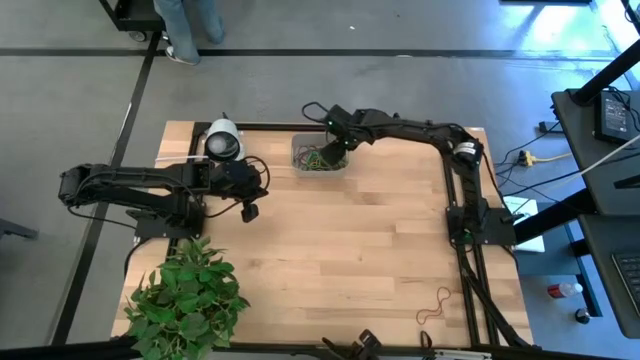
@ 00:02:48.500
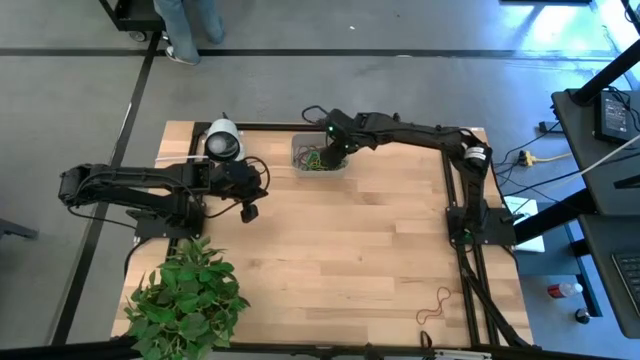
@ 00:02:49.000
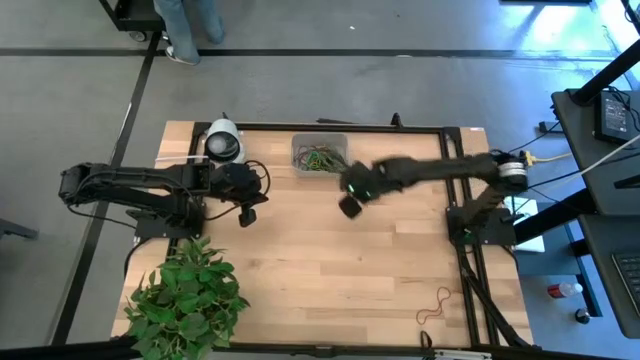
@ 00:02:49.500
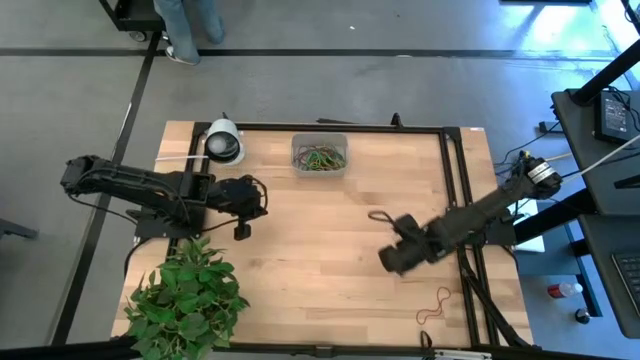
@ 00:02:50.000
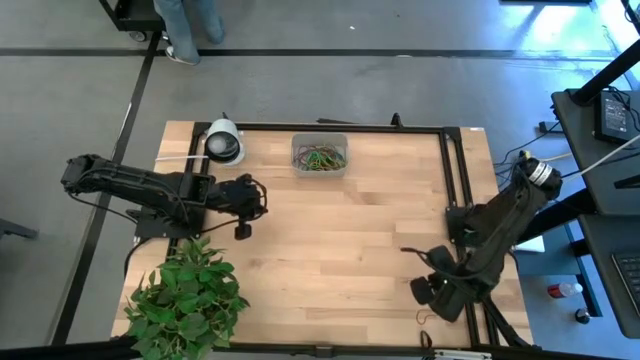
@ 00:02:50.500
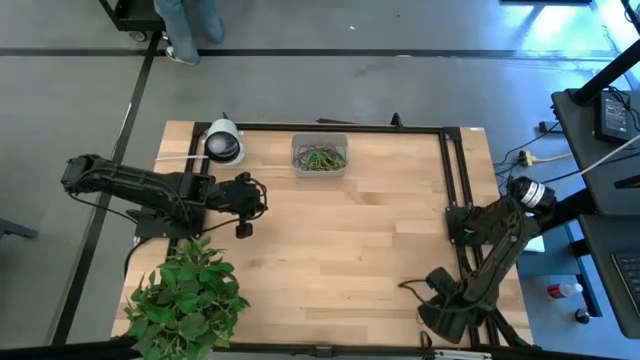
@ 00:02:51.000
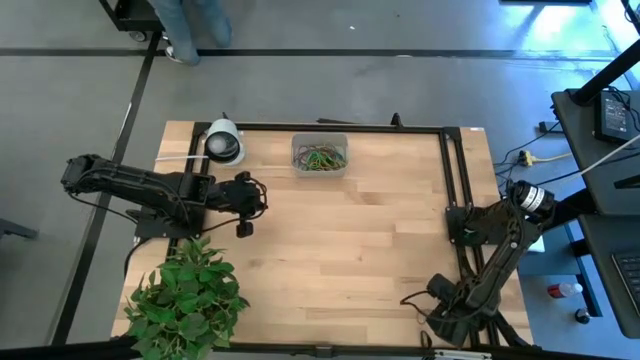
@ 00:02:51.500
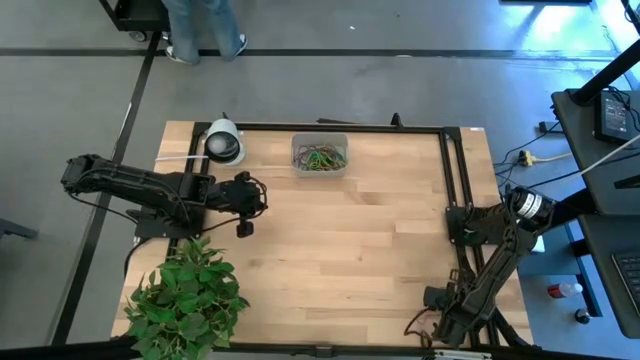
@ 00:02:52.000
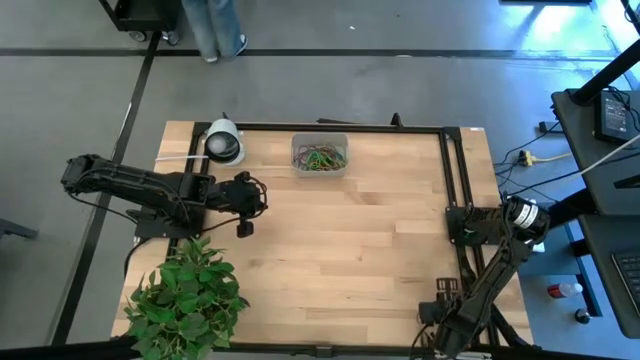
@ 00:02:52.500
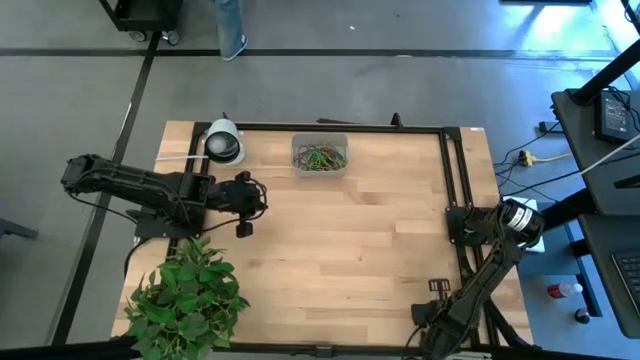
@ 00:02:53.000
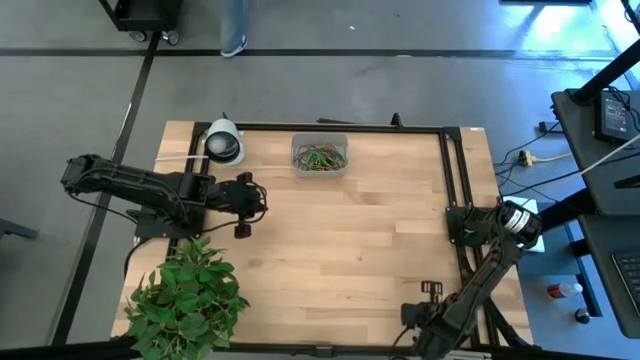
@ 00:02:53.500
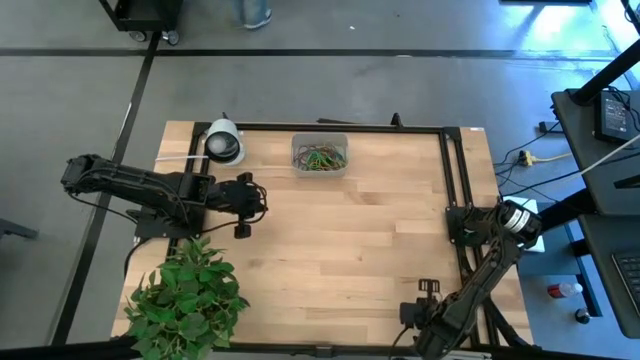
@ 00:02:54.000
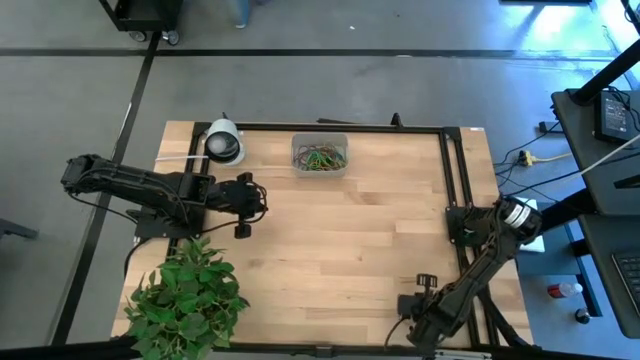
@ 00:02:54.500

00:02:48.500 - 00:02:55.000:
Task: Pick and place rubber bands into bin
Put the red rubber band into the white bin

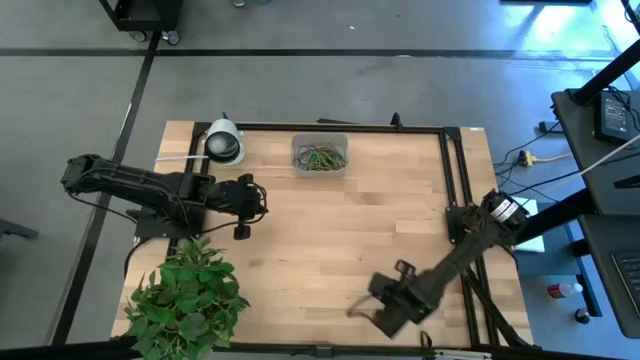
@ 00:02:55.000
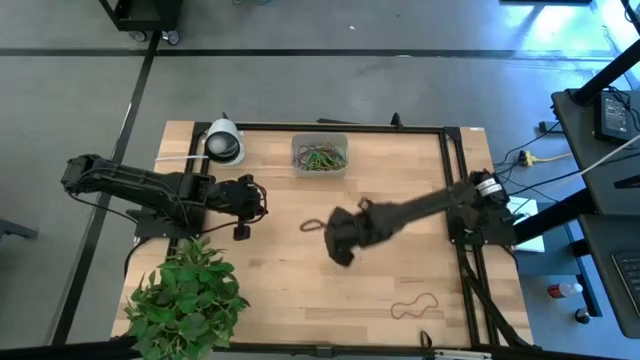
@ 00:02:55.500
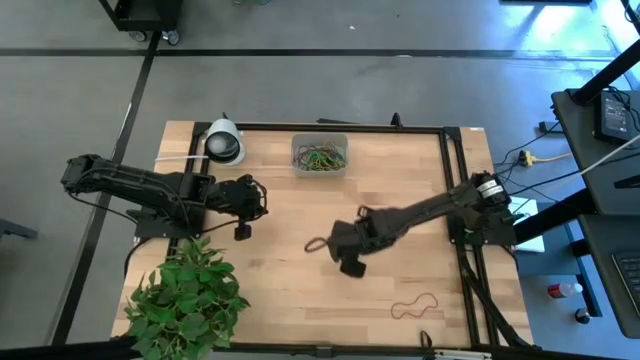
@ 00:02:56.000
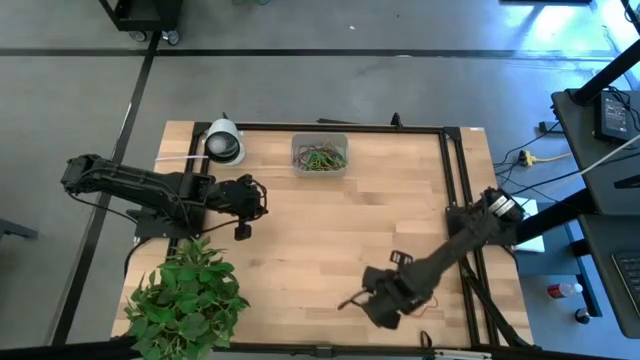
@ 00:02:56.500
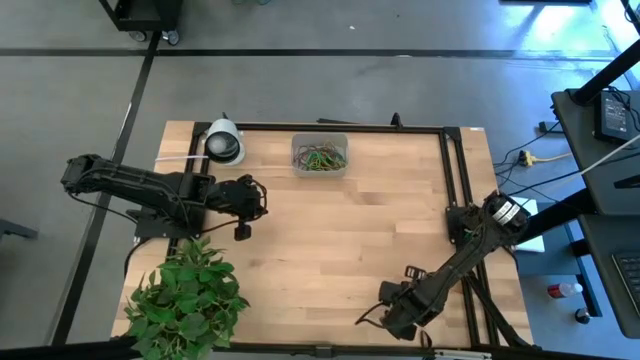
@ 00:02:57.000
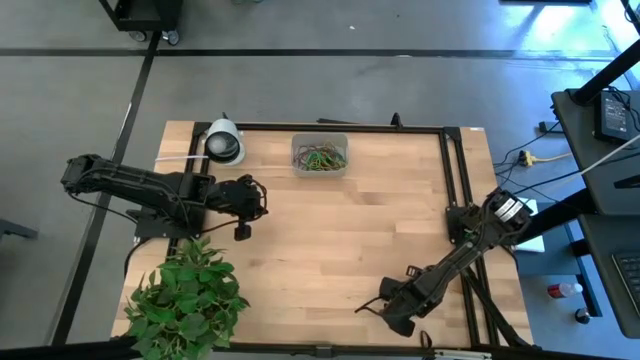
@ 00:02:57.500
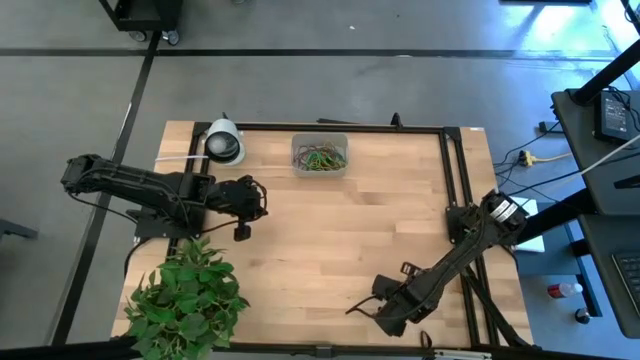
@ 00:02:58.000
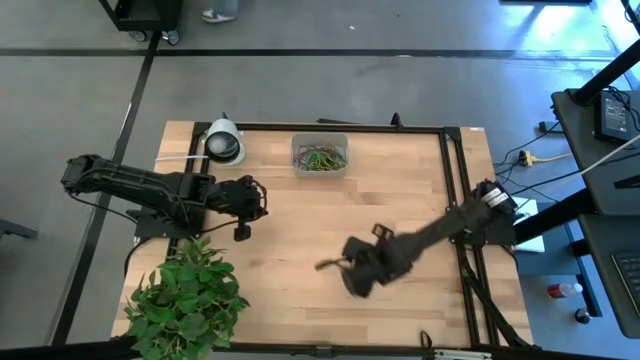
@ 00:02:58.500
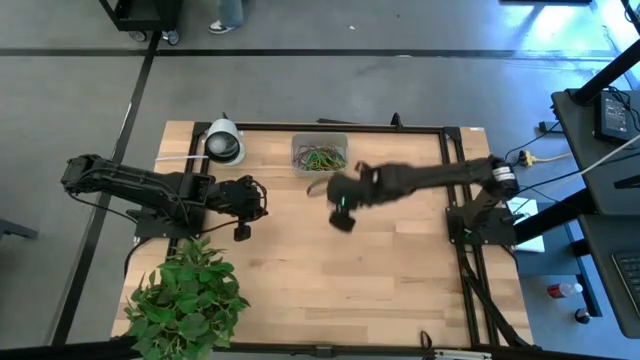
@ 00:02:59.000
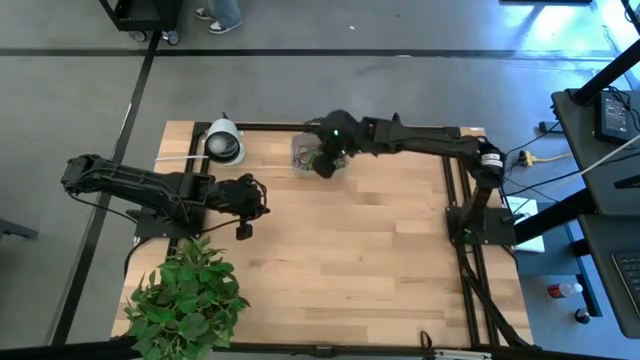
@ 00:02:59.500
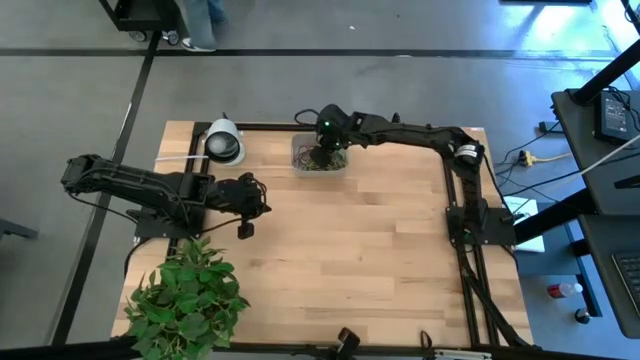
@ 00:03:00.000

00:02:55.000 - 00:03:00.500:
Put the red rubber band into the white bin

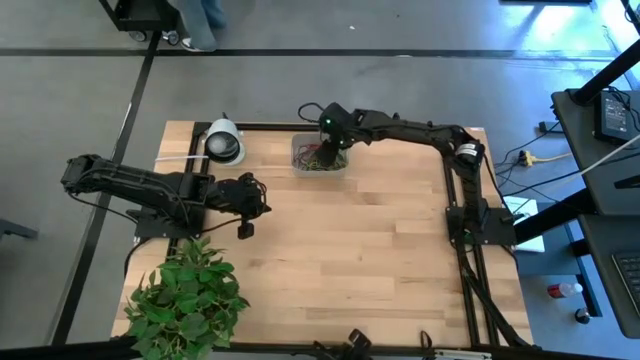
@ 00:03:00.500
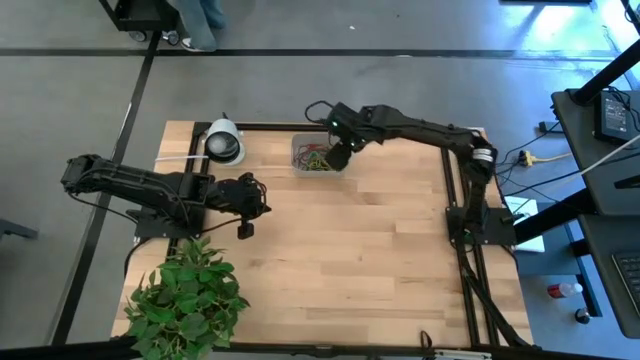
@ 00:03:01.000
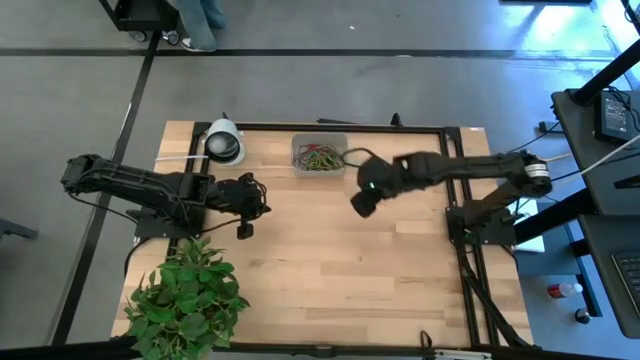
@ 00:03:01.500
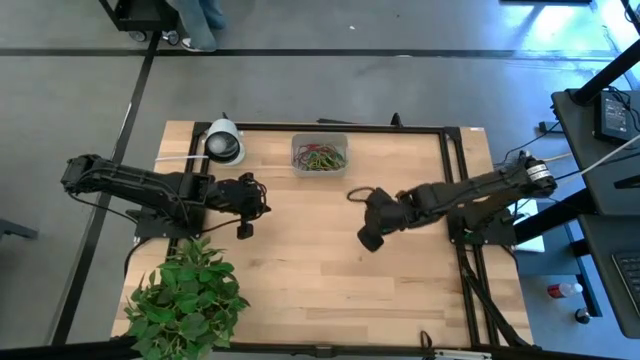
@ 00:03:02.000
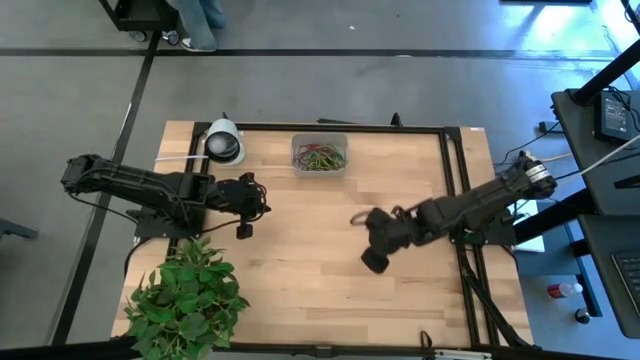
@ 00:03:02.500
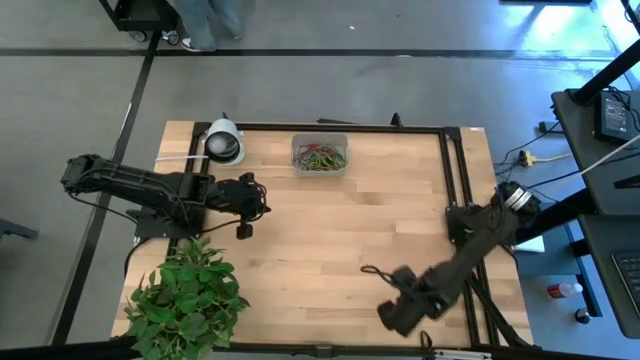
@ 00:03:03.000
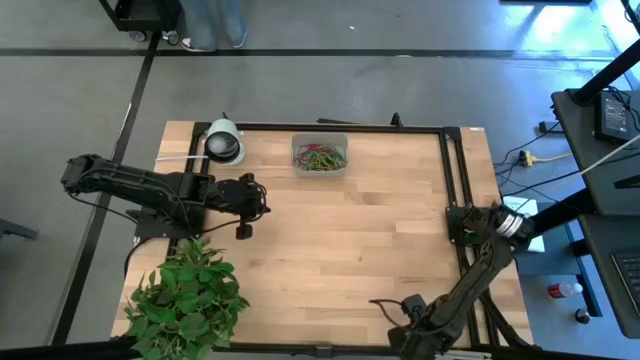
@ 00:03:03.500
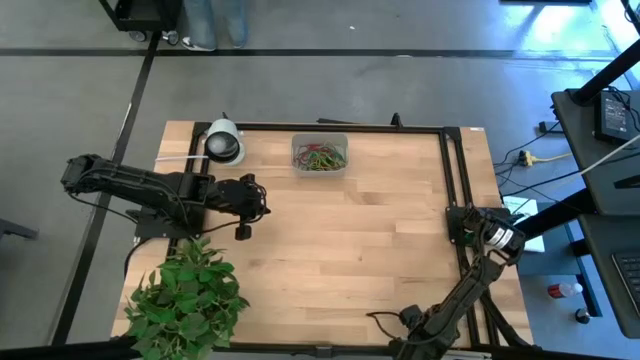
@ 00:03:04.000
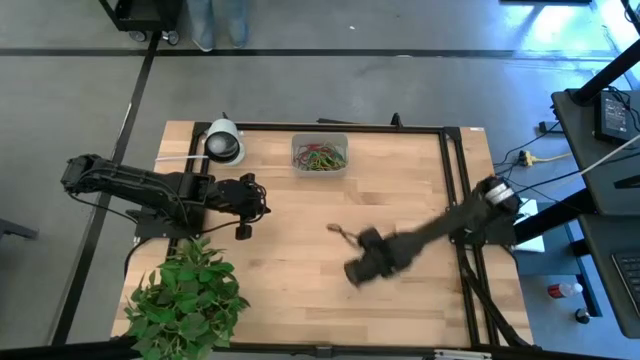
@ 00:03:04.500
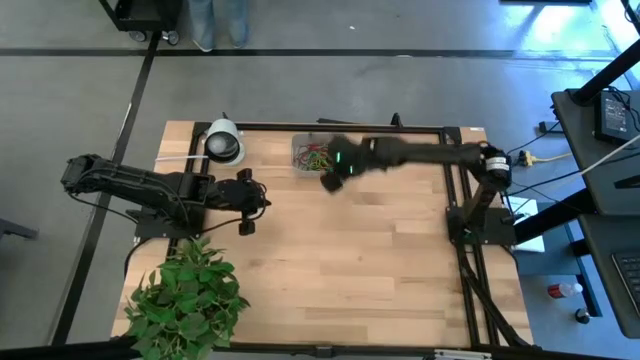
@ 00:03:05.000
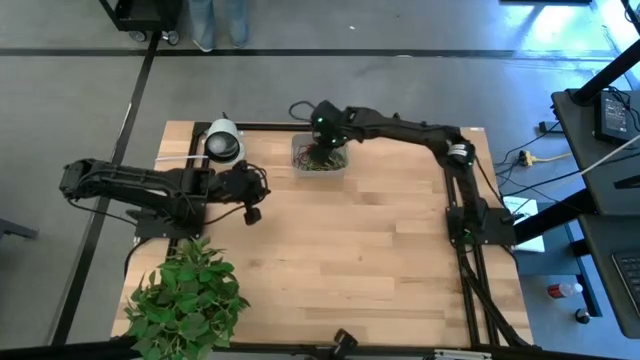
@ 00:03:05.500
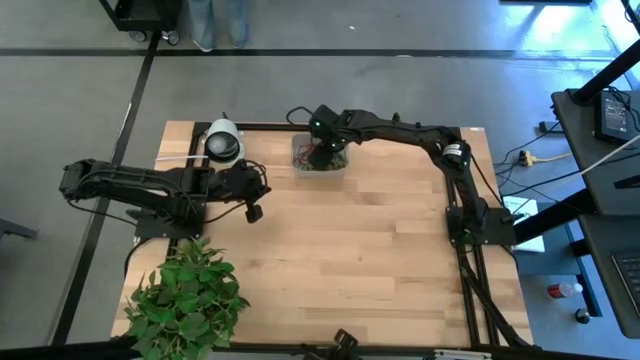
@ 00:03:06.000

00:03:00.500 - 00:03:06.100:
Put the black rubber band into the white bin

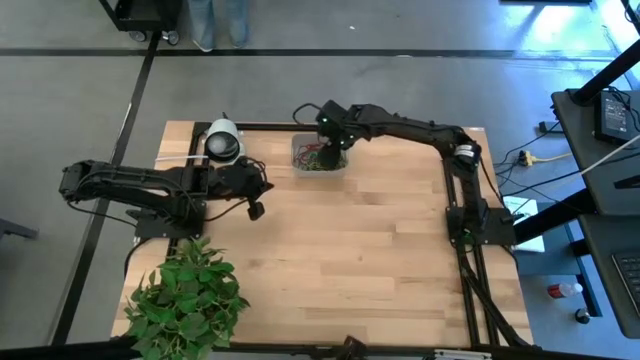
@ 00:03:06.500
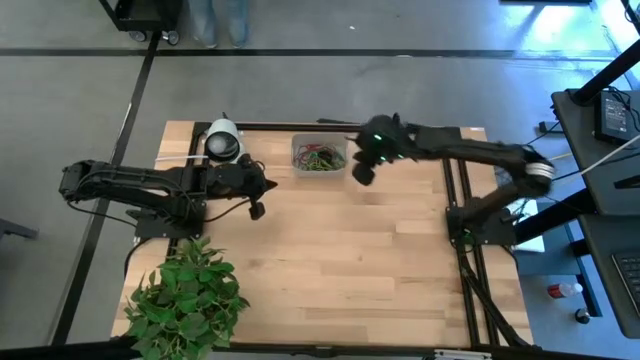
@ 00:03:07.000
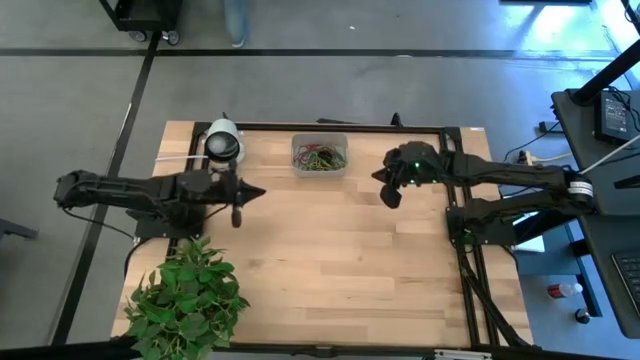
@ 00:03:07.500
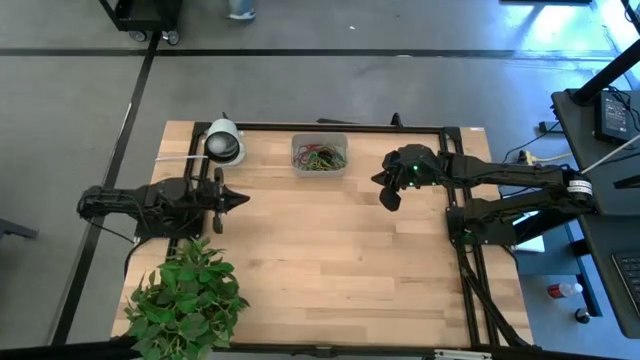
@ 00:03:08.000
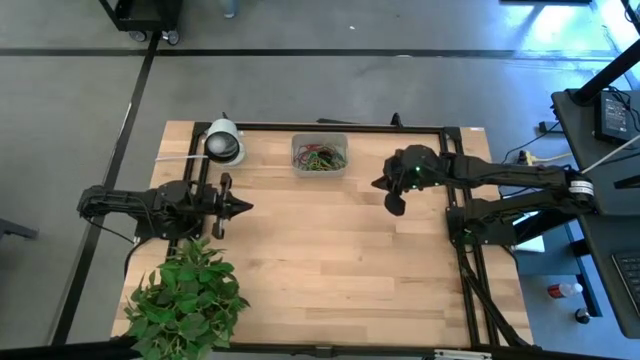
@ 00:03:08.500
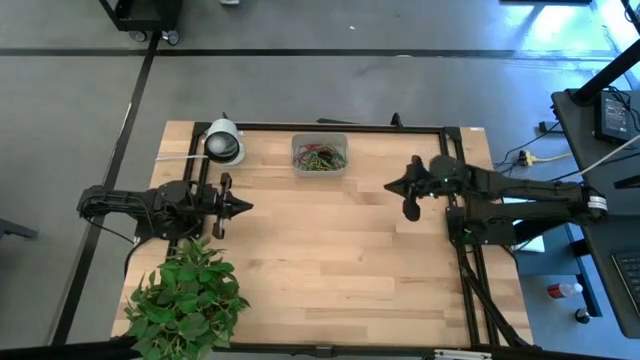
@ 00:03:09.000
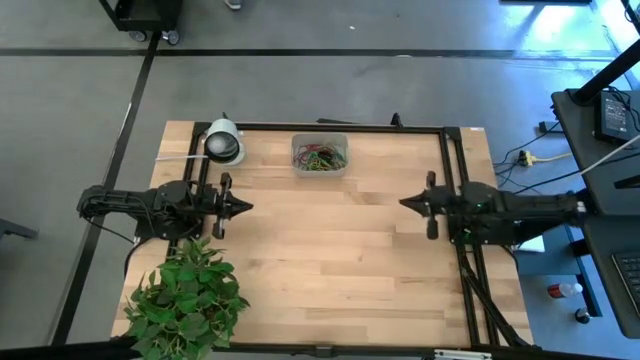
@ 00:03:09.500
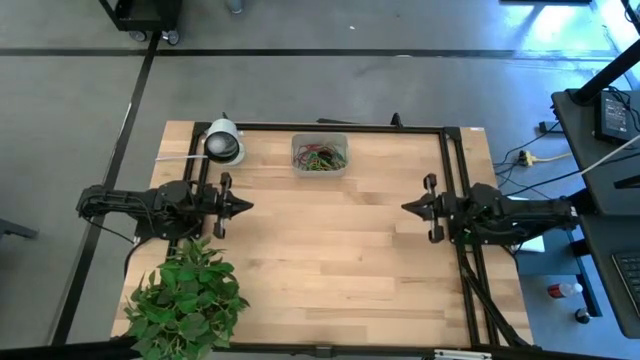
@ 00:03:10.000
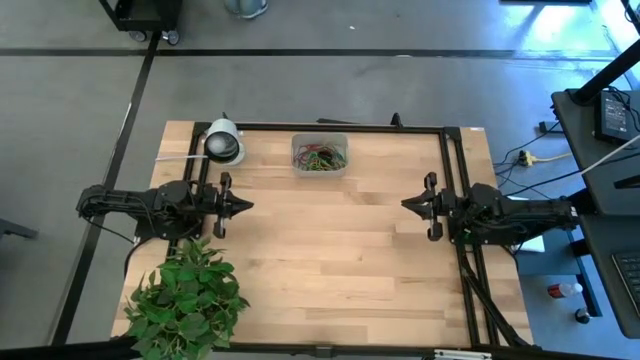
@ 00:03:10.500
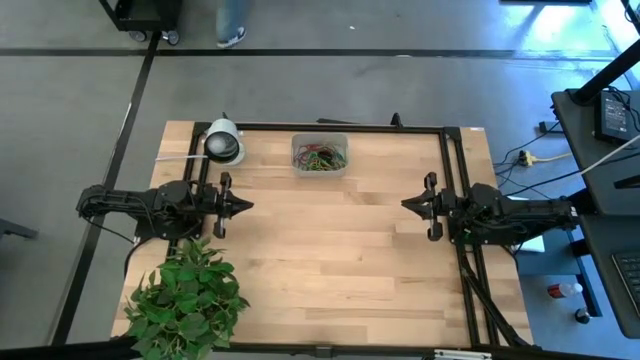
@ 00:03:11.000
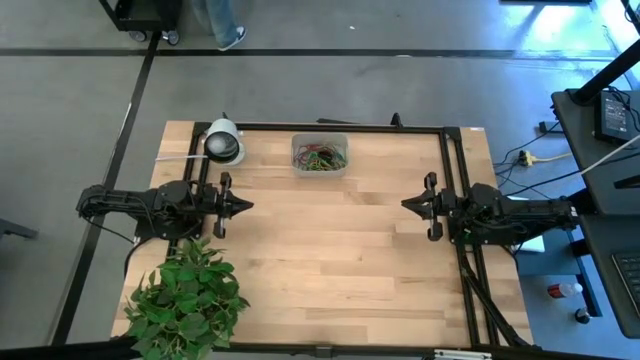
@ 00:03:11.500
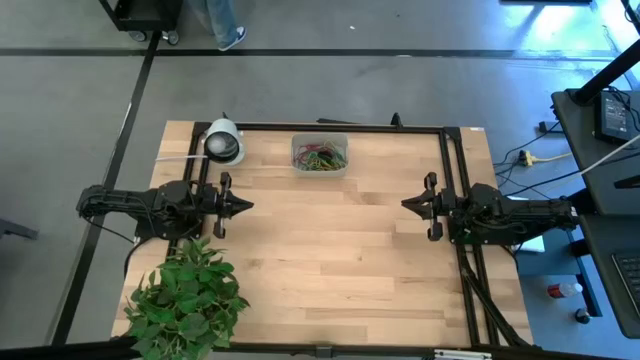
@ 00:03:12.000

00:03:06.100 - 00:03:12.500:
Return to Home Position
